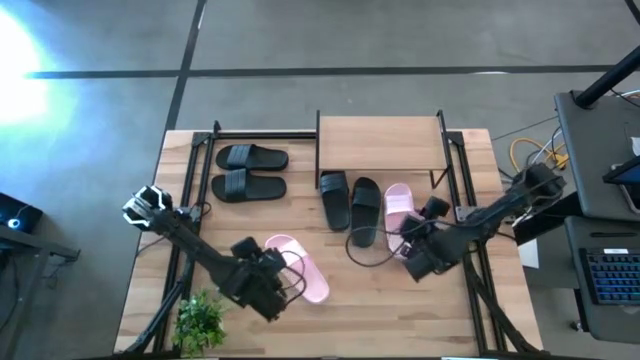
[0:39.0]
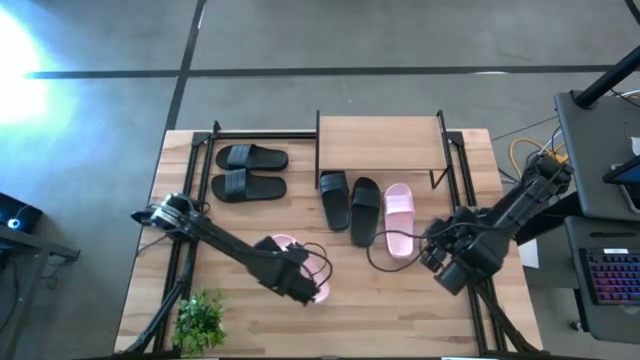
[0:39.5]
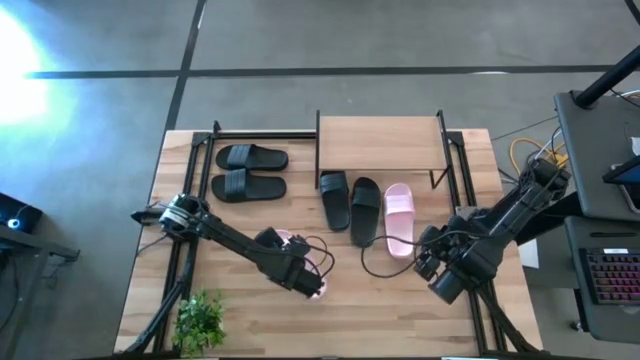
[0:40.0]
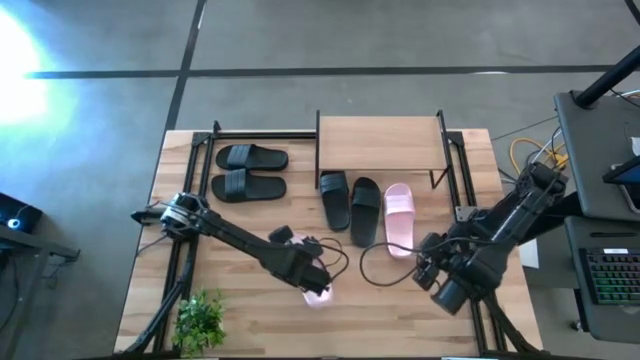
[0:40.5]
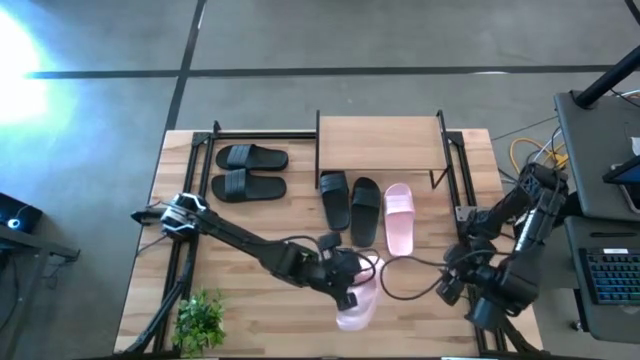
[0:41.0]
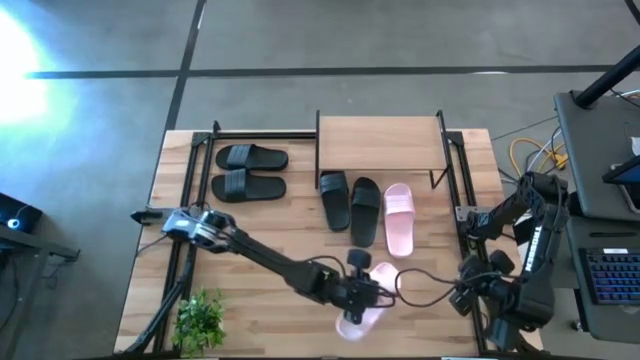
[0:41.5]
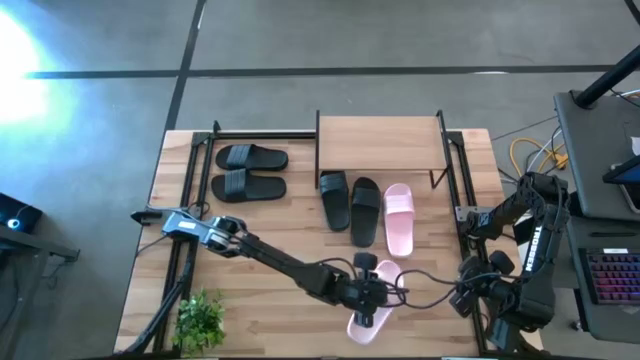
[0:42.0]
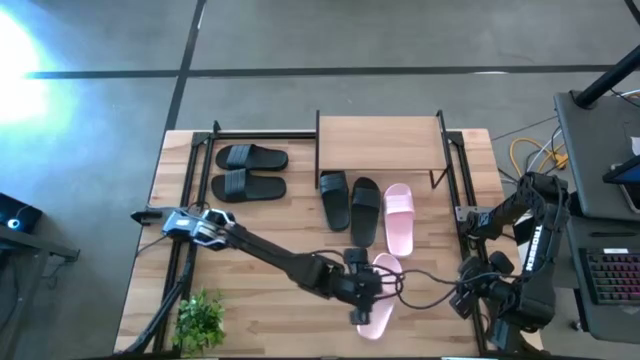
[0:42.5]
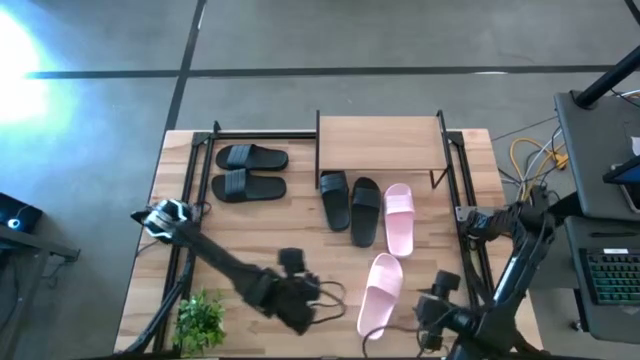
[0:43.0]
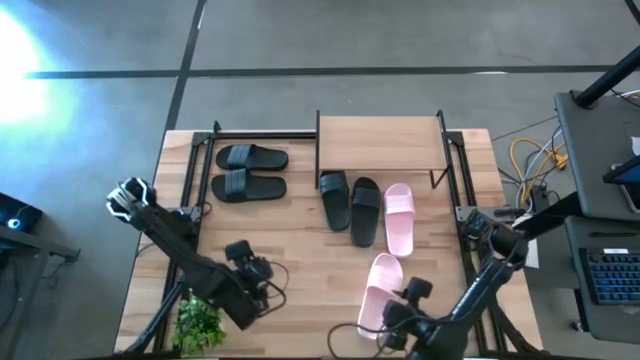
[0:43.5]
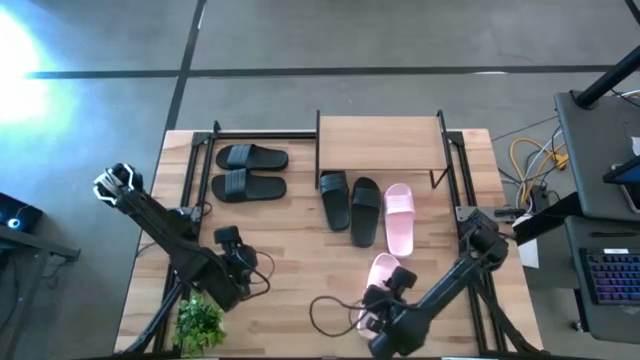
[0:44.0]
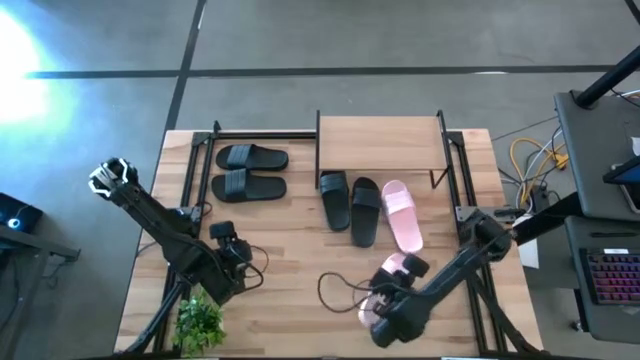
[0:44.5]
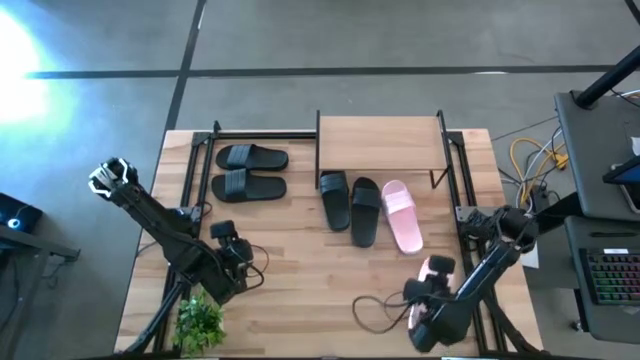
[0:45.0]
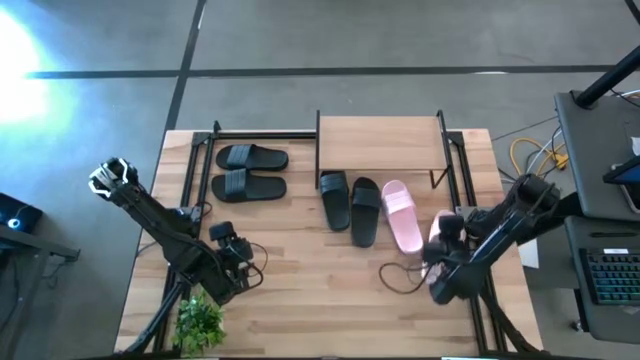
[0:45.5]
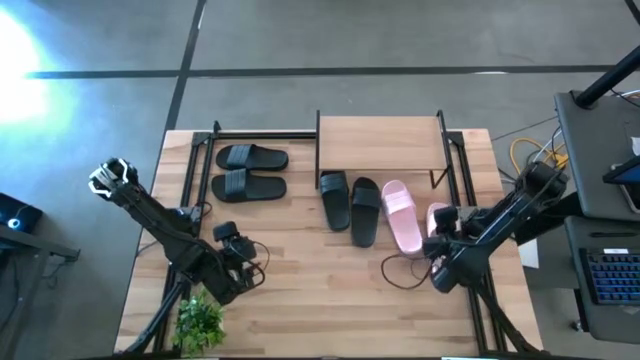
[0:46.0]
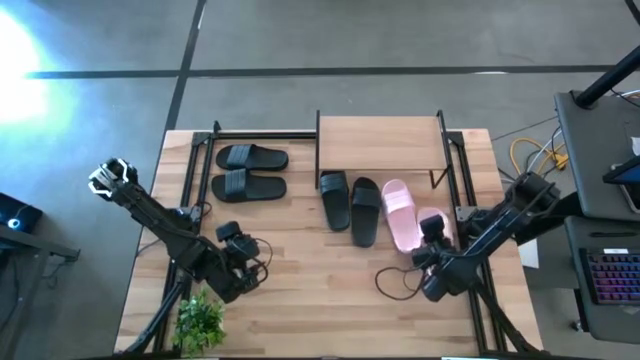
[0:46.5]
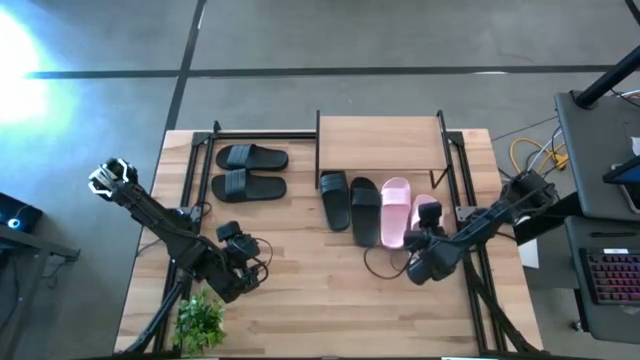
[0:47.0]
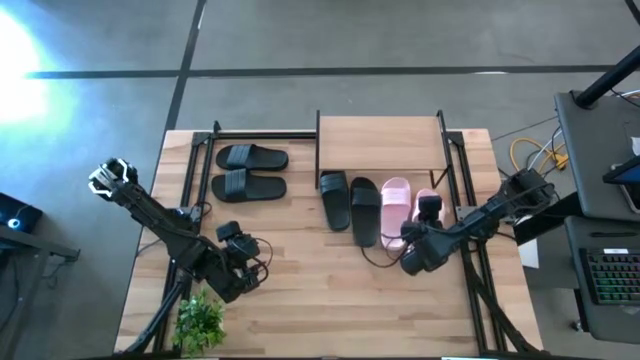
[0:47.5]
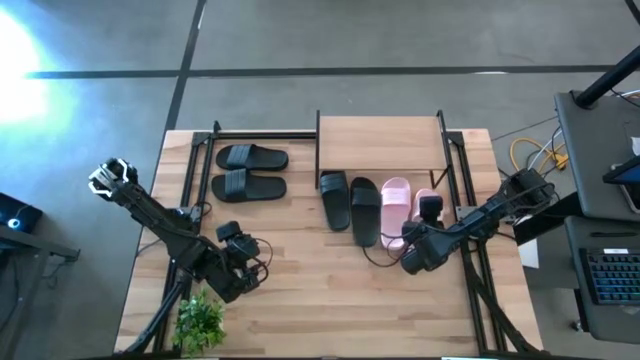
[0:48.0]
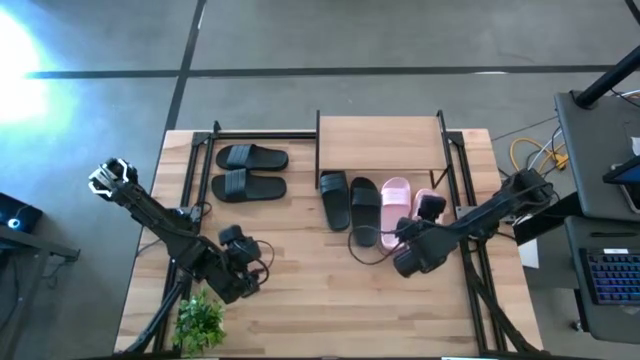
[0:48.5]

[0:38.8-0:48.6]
Task: Pick and place slides into the shelf
Put the pink slide under the shelf

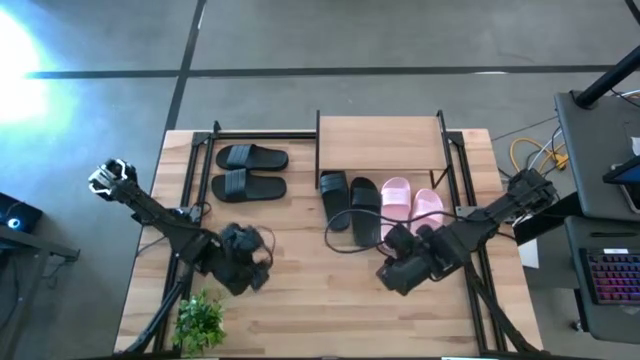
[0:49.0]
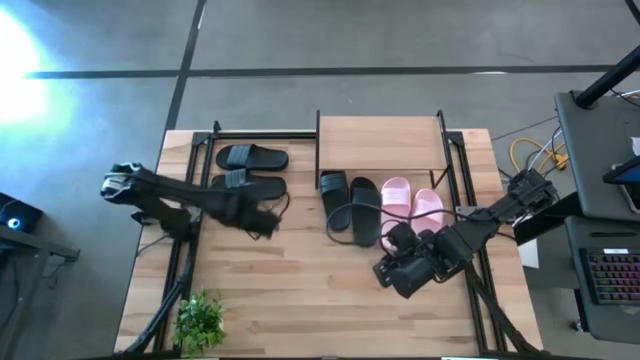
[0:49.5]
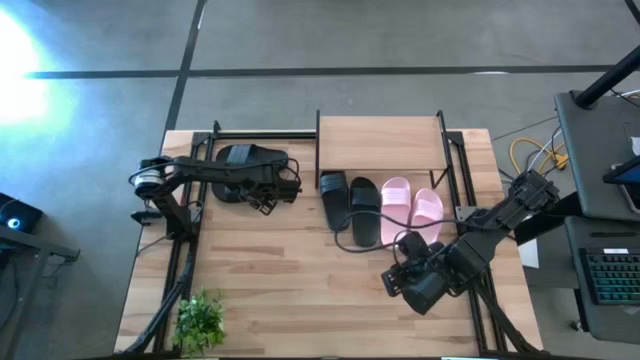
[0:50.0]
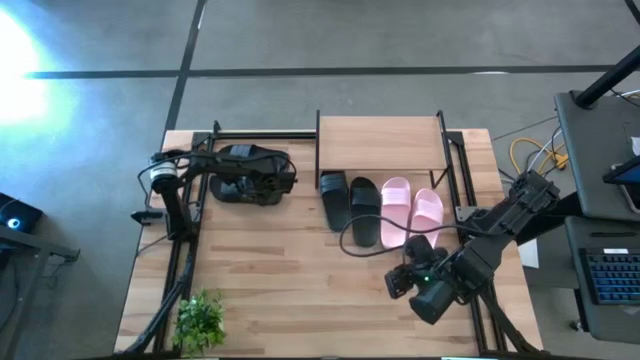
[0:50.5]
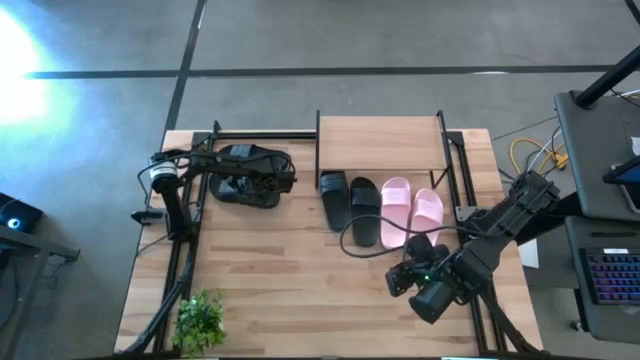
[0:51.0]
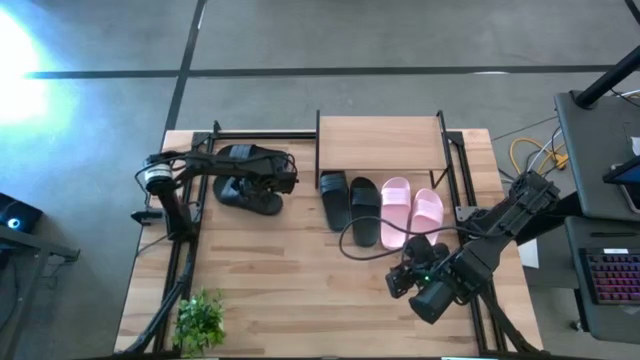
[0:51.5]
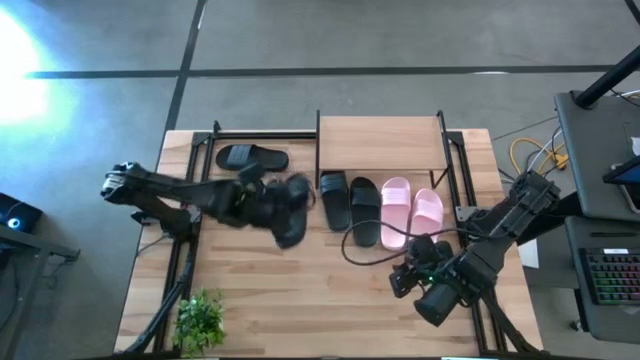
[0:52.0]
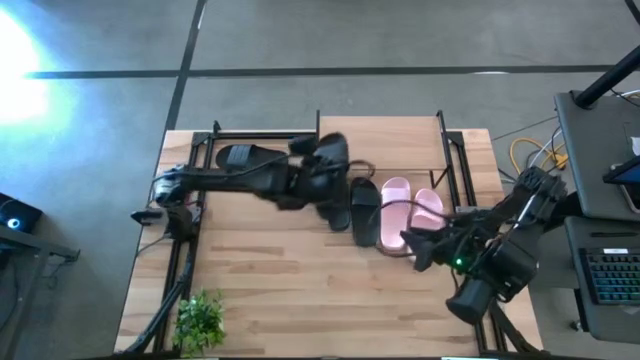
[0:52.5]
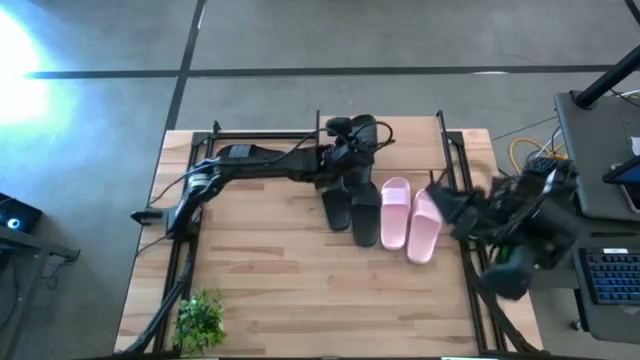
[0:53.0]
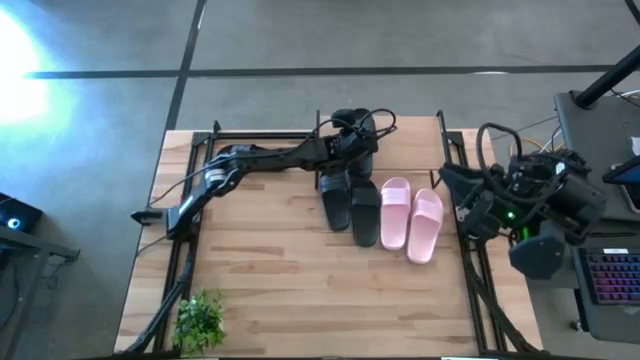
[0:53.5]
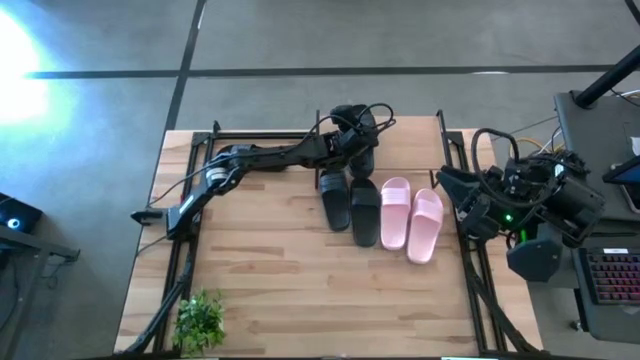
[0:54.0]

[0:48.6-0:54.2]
Put the black slide on the shelf

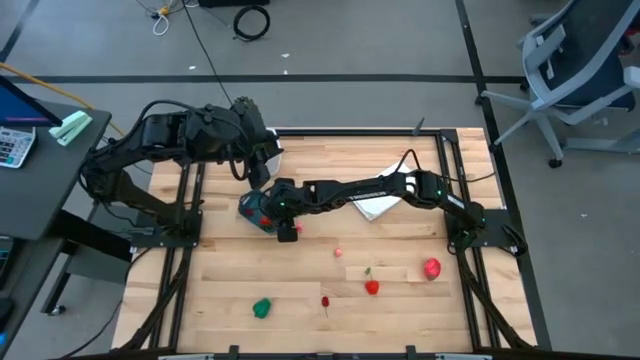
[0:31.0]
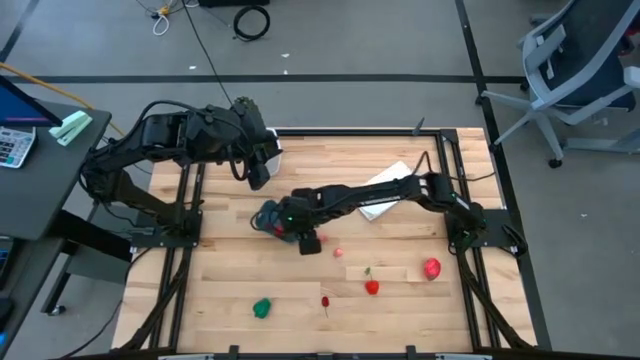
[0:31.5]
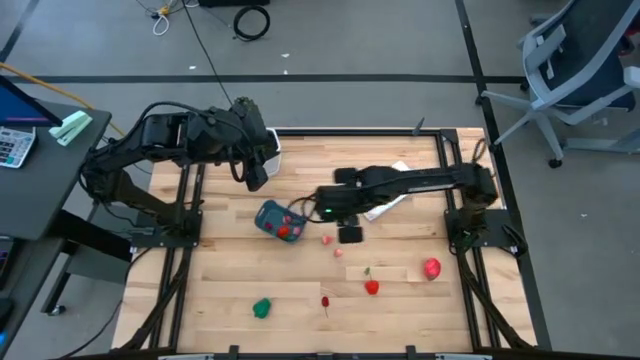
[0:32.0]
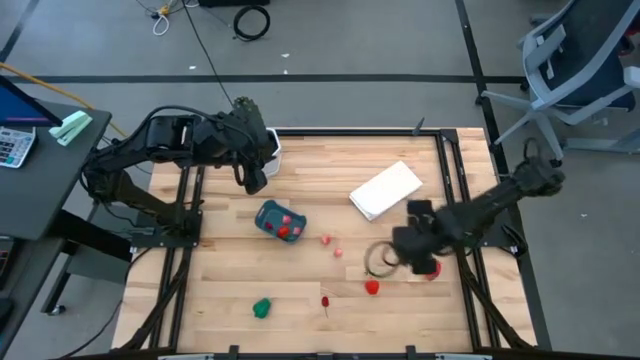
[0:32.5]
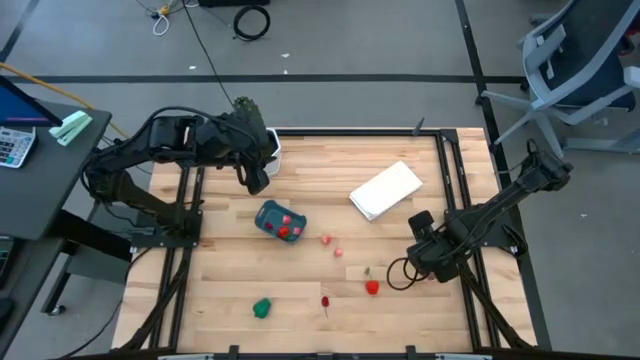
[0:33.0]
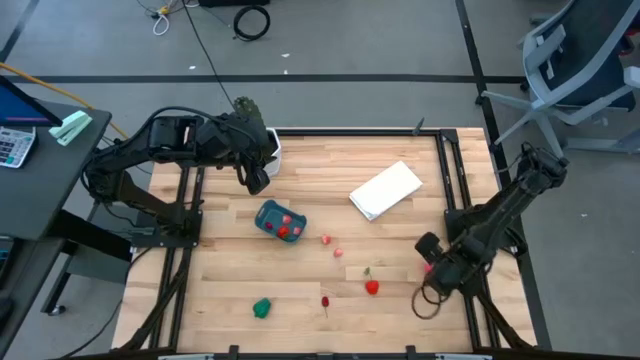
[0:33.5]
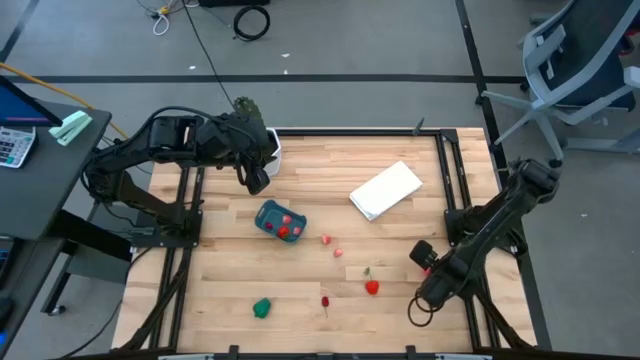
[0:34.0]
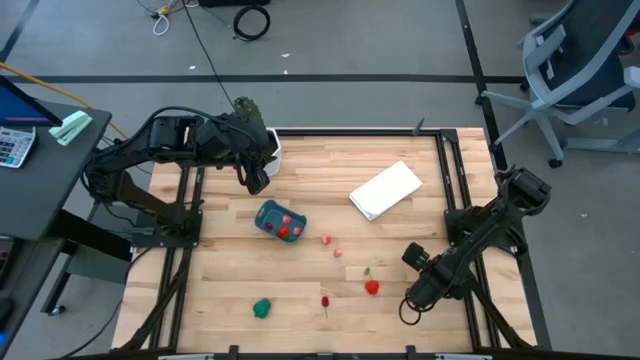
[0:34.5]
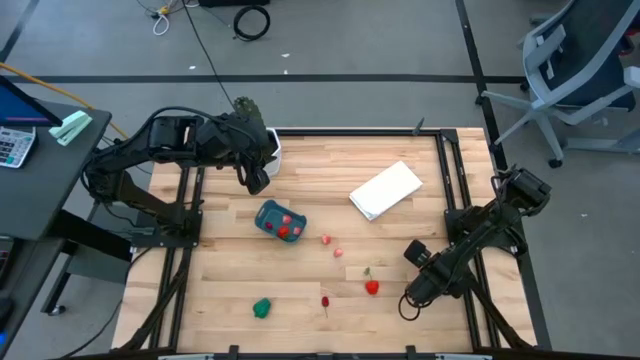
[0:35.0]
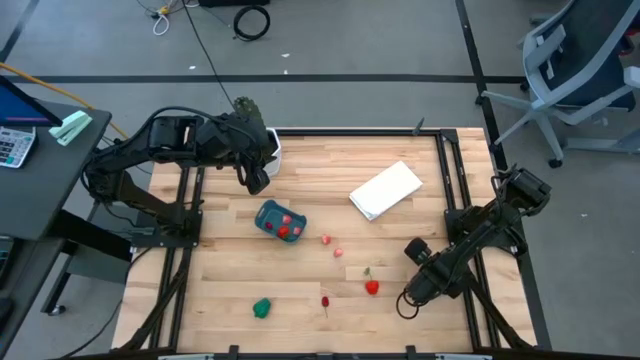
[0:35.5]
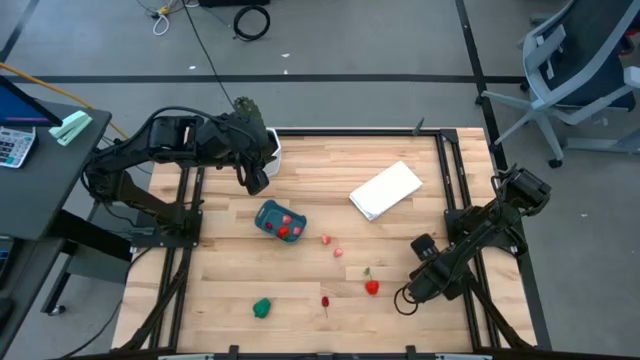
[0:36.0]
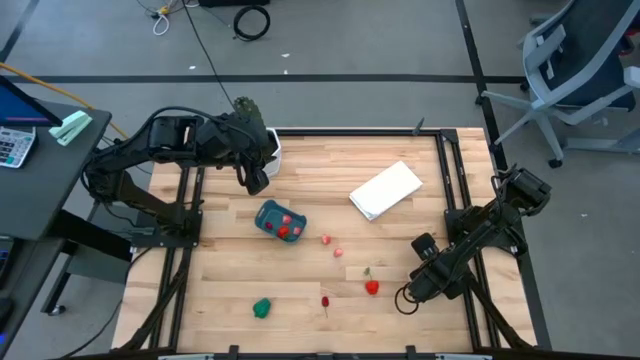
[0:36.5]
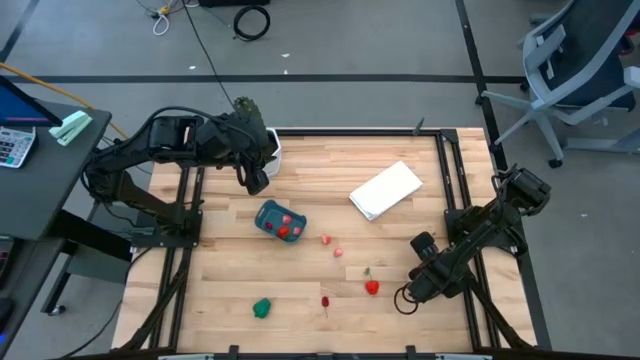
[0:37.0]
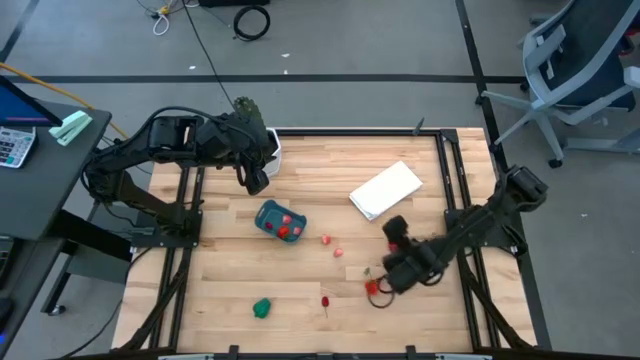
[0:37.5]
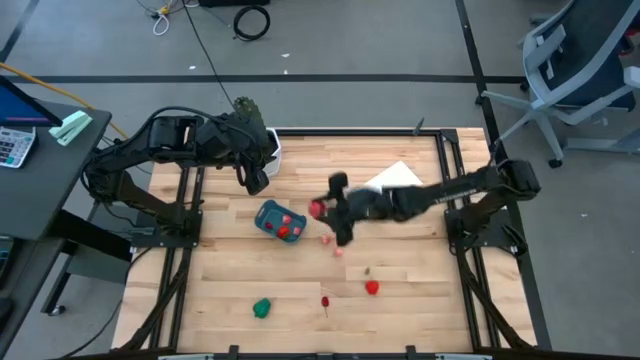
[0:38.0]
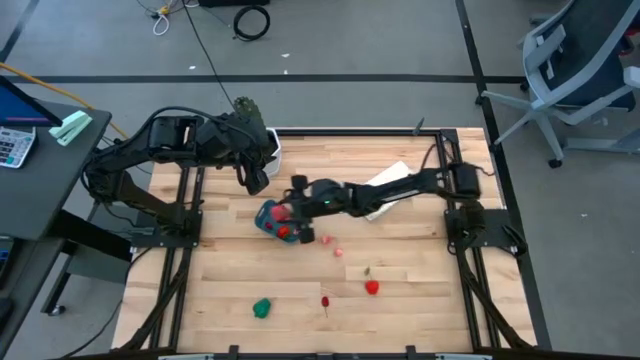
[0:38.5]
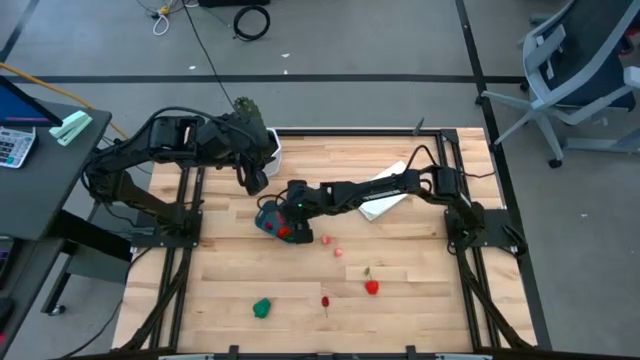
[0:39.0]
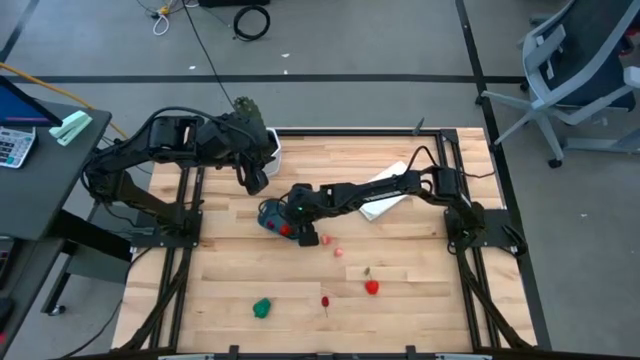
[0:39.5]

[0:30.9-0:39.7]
Task: Pick and placing Produce into tupperware
Put the red dragonfruit into the blue bin
